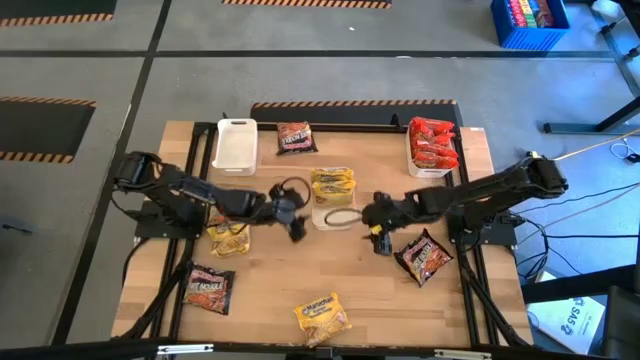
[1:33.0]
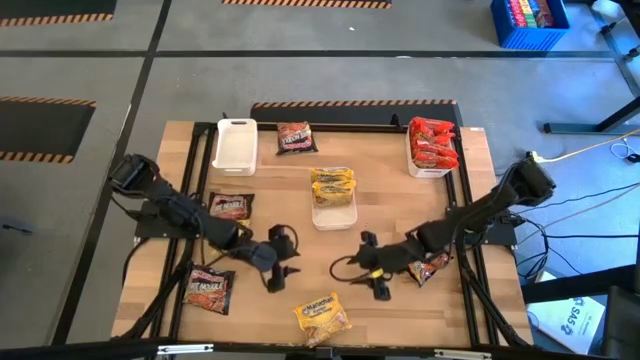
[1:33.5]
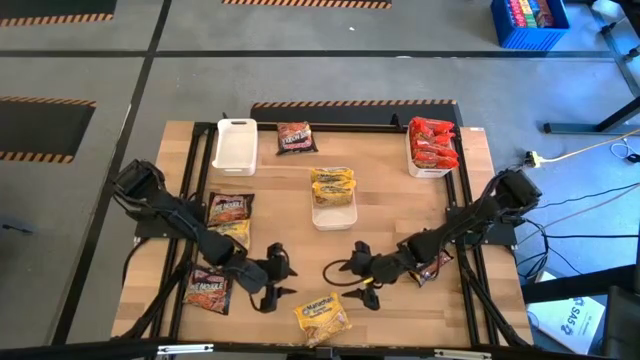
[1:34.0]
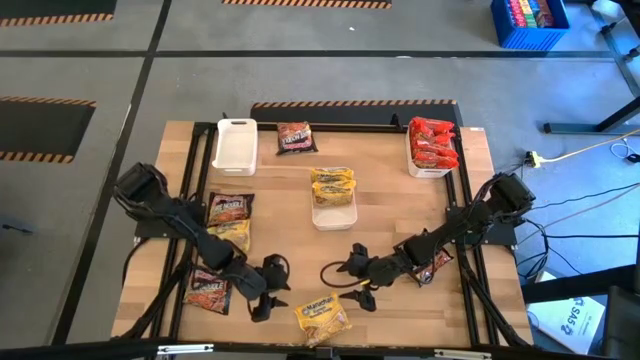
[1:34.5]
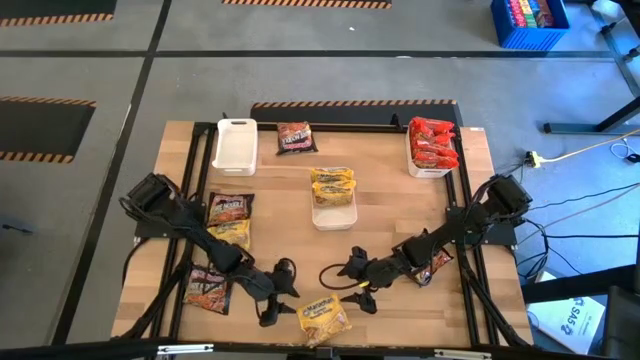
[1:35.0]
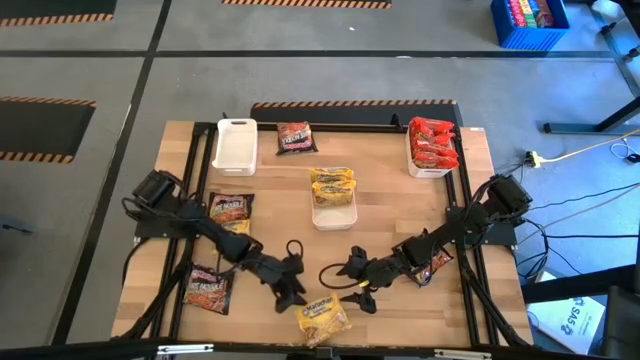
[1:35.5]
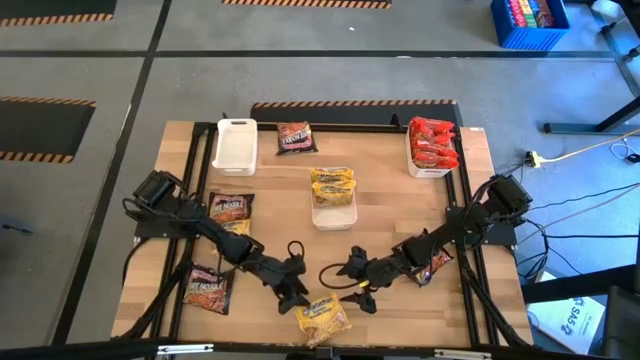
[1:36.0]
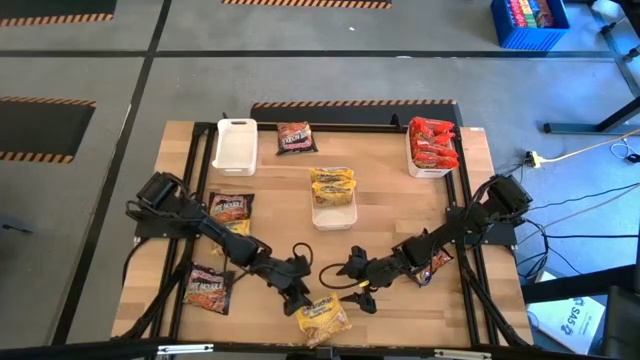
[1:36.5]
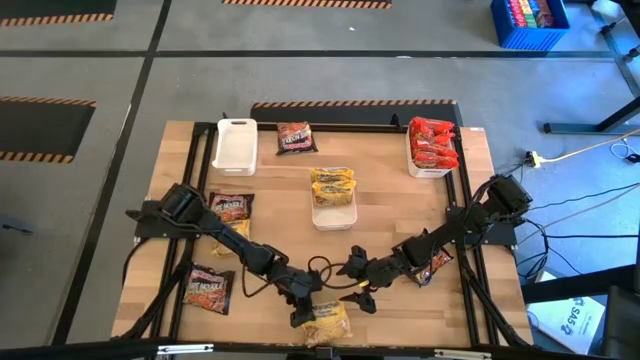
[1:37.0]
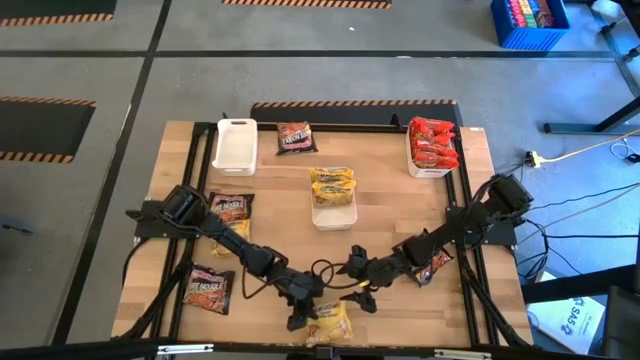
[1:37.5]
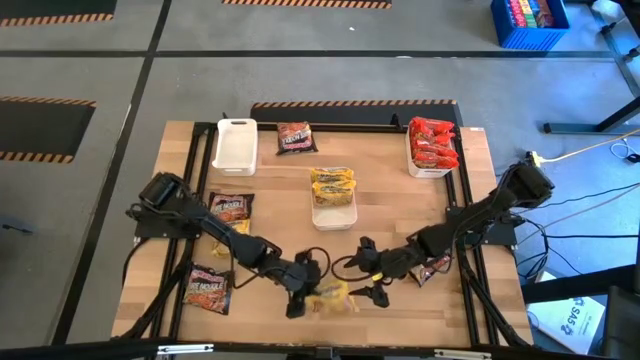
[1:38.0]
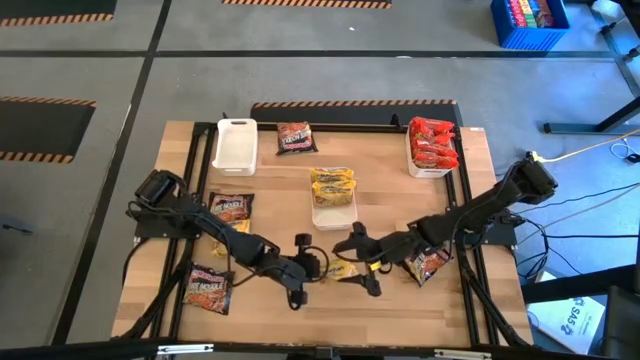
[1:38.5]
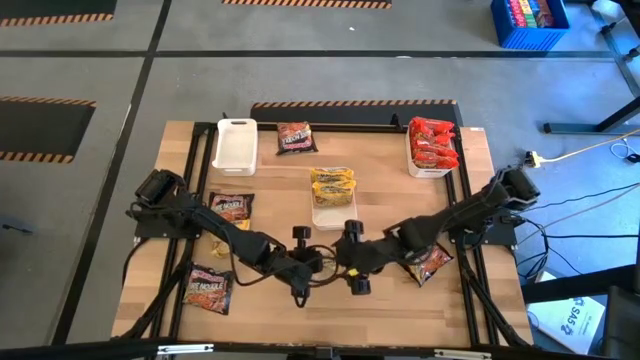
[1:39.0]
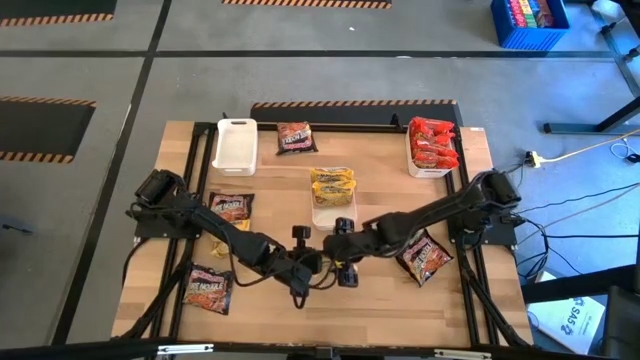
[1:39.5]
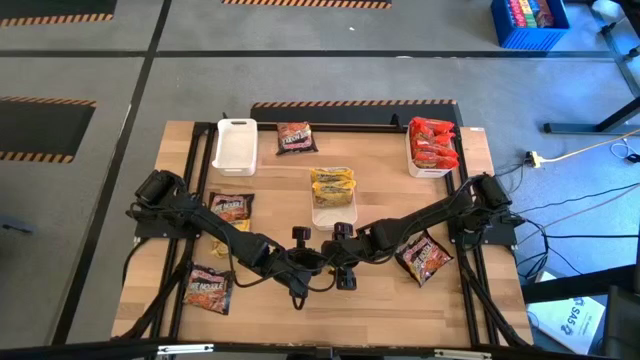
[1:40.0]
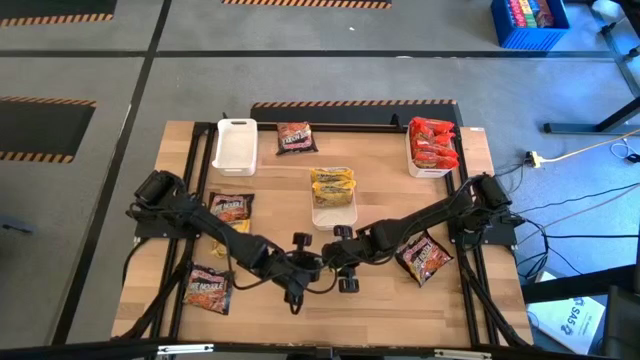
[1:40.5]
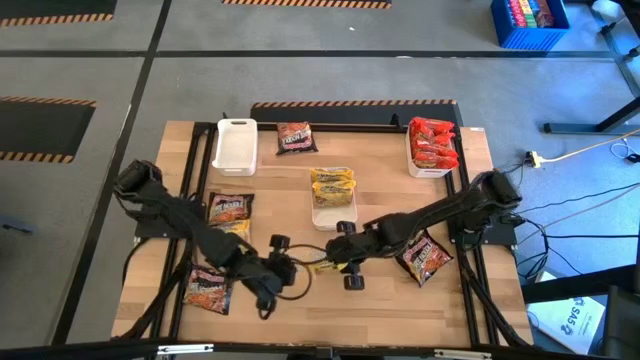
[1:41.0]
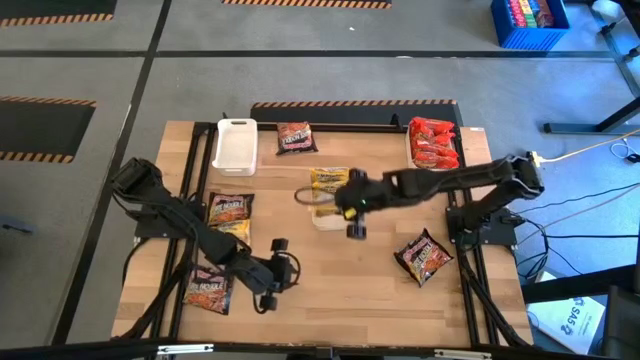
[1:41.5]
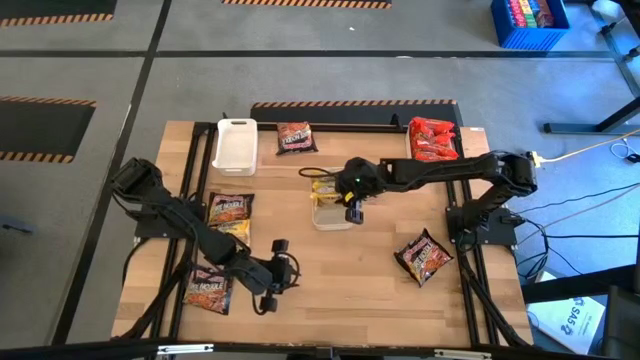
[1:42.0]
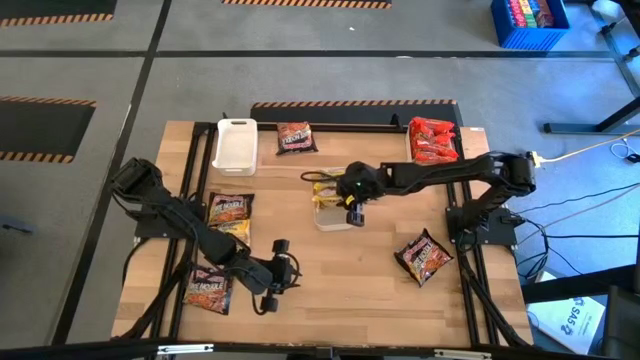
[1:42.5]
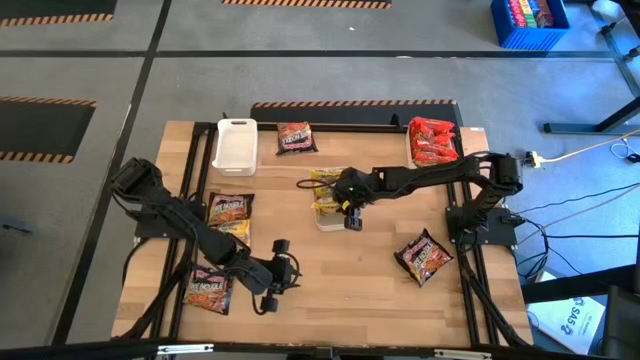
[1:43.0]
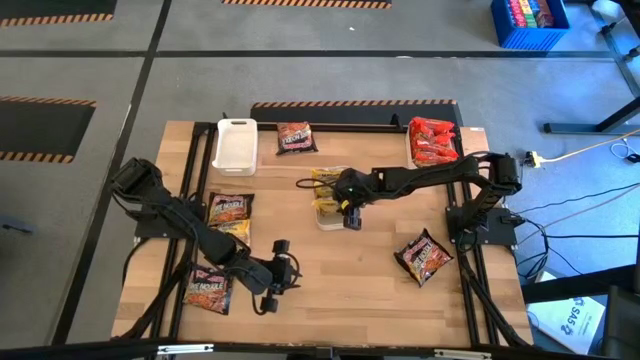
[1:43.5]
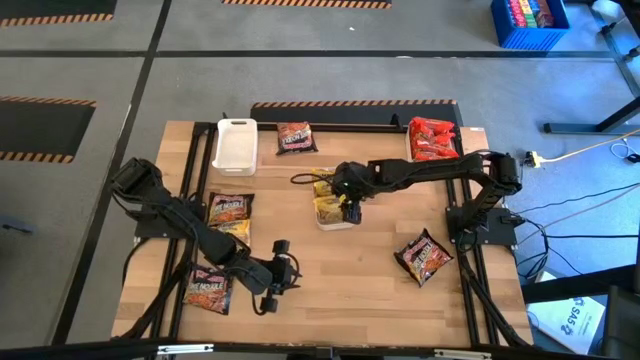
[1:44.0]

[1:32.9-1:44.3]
Task: Sort Maruchan noodles
Put the yellow noodle pack into the white middle bin

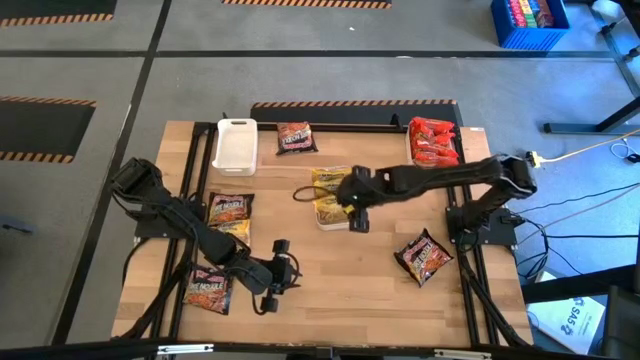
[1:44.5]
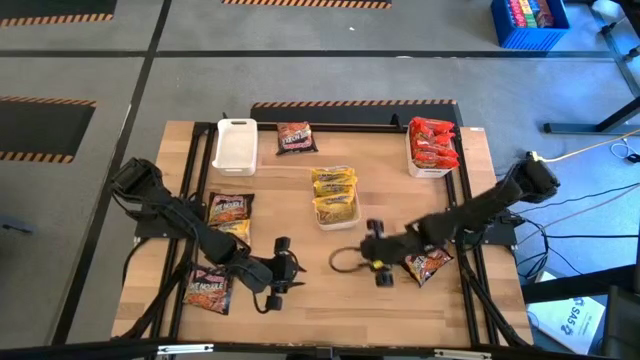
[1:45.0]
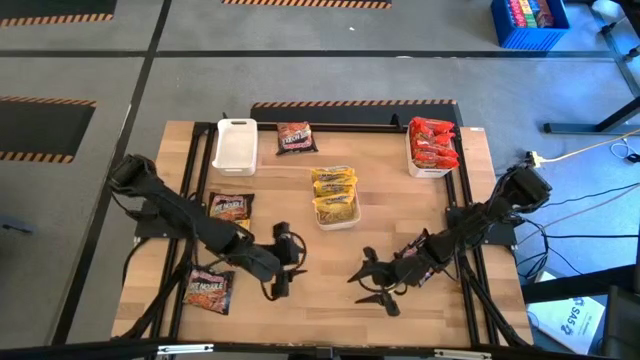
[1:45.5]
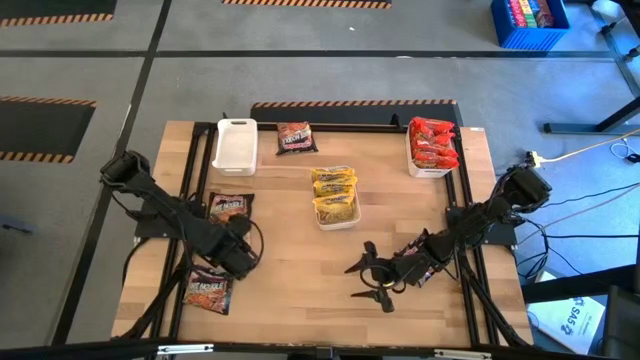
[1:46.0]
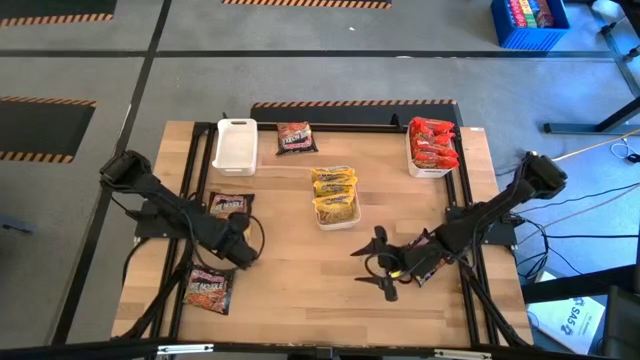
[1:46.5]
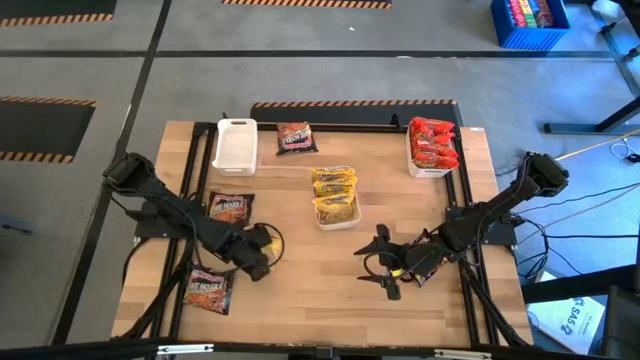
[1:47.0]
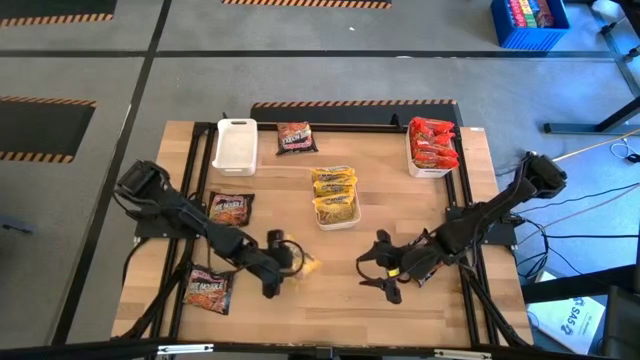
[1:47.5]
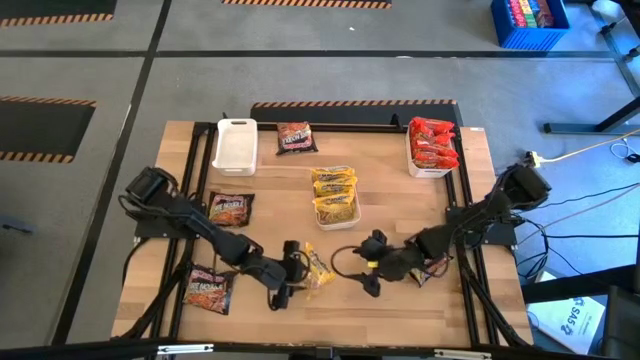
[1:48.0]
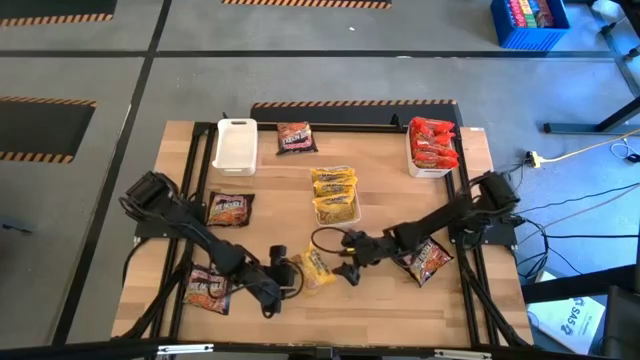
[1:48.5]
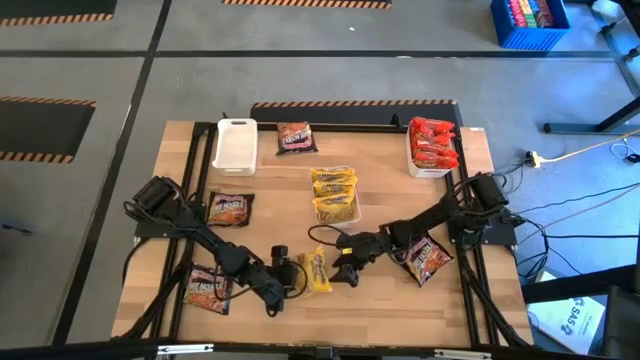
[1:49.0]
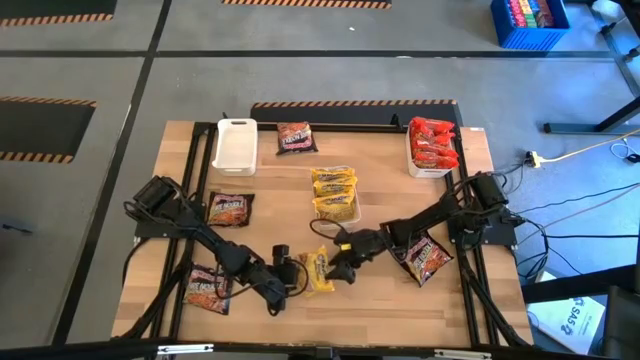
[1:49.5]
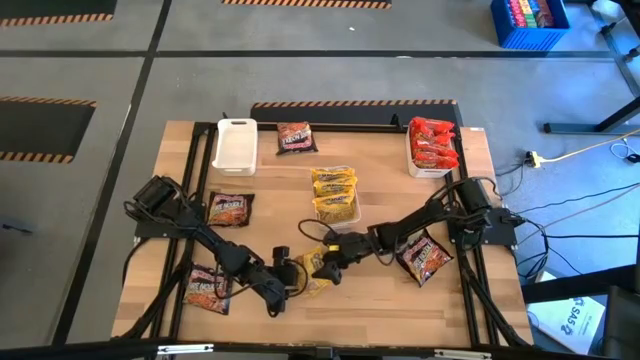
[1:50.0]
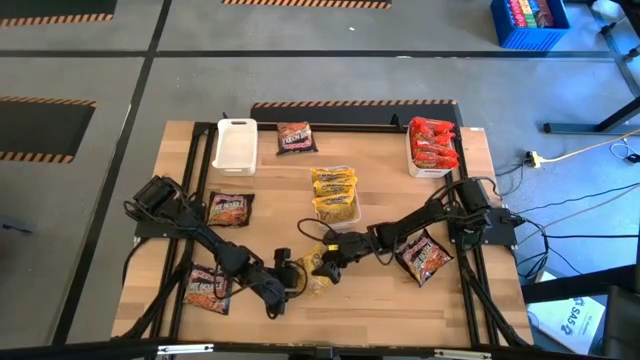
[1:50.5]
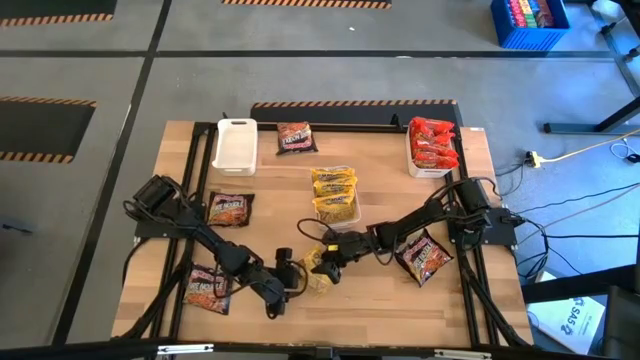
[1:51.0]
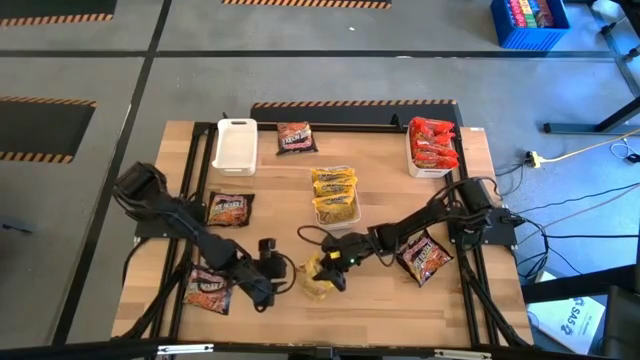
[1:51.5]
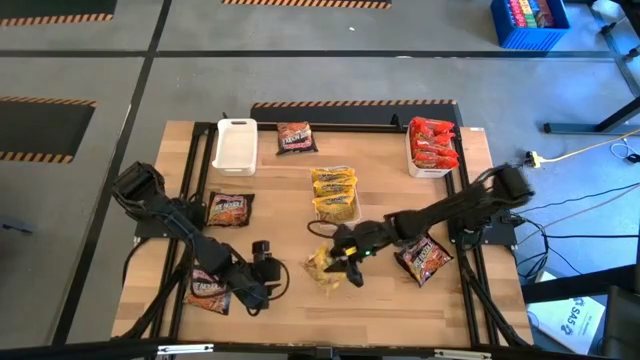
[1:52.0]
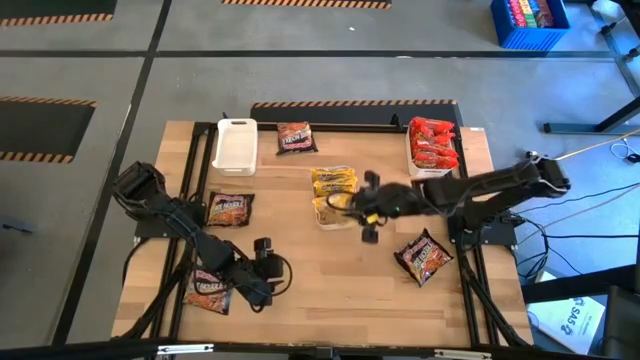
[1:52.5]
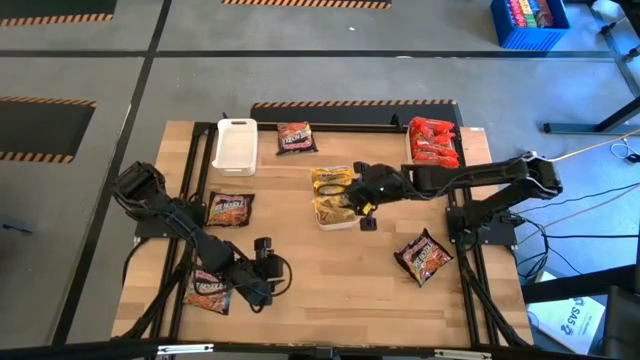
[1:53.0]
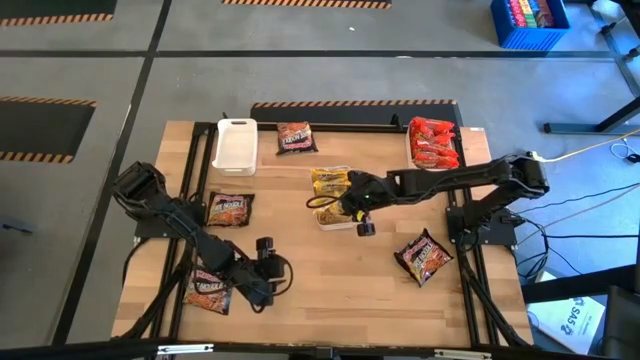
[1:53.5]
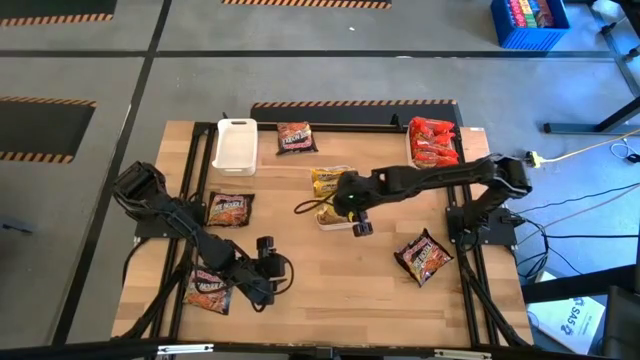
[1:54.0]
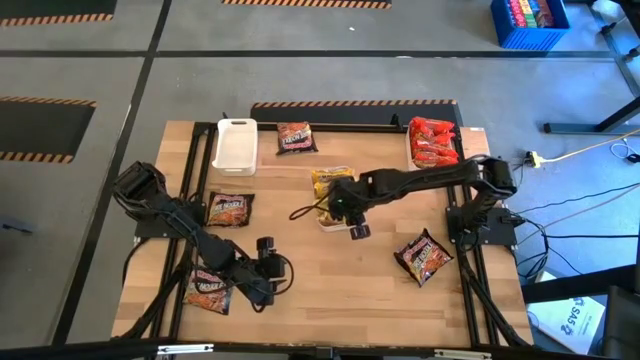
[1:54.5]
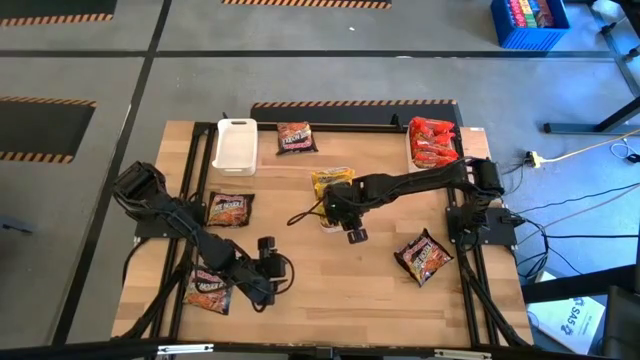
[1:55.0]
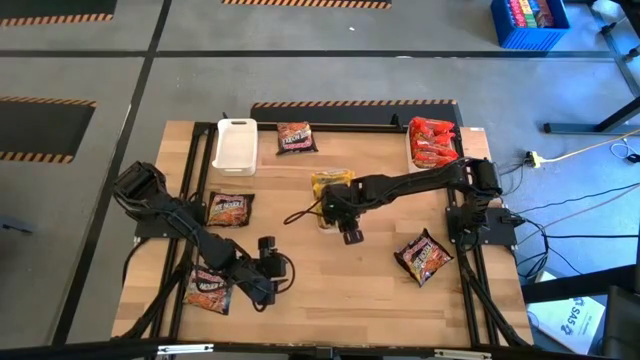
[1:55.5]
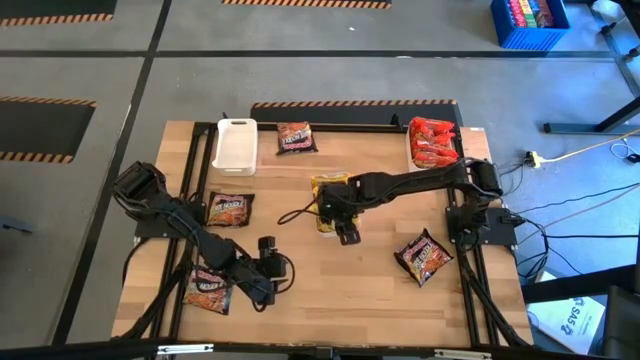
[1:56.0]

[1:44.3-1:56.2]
Put the yellow noodle pack into the white middle bin
